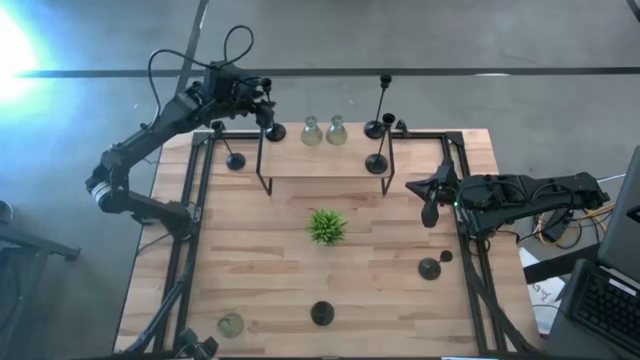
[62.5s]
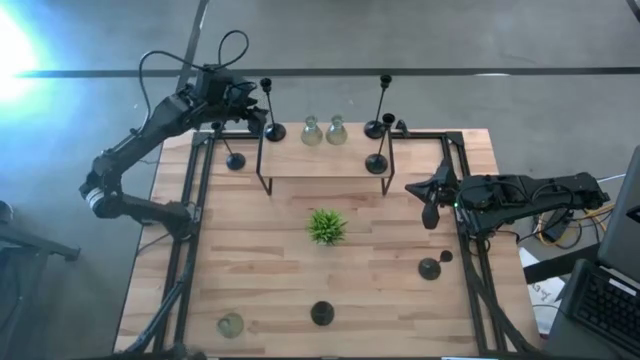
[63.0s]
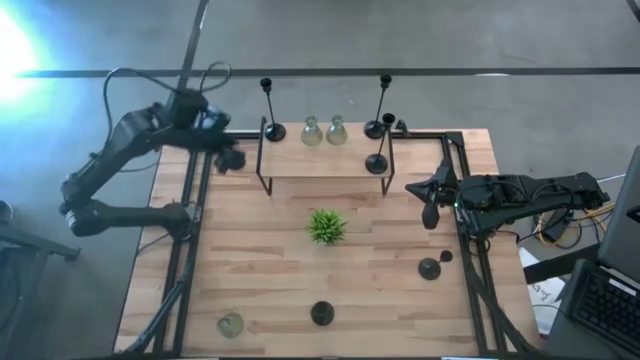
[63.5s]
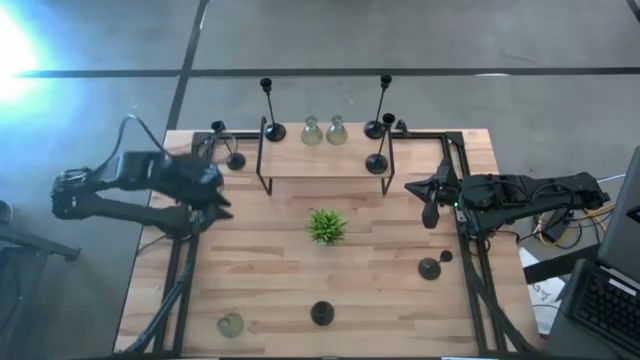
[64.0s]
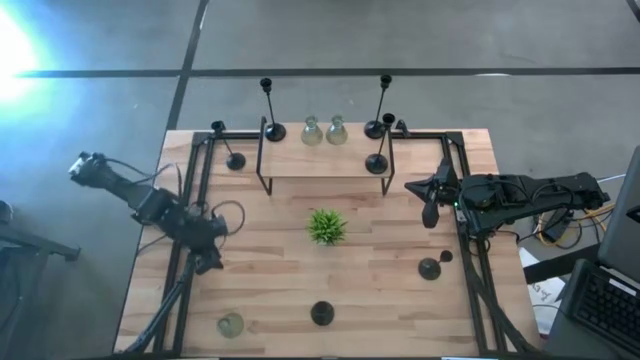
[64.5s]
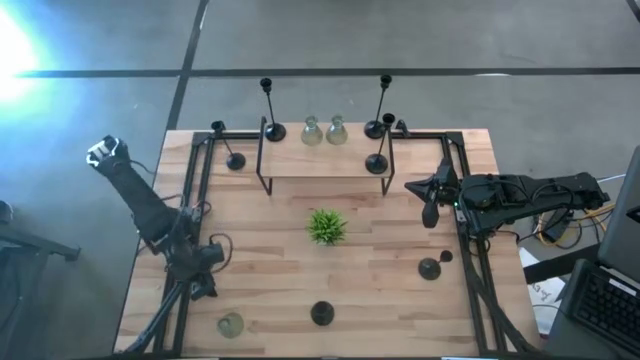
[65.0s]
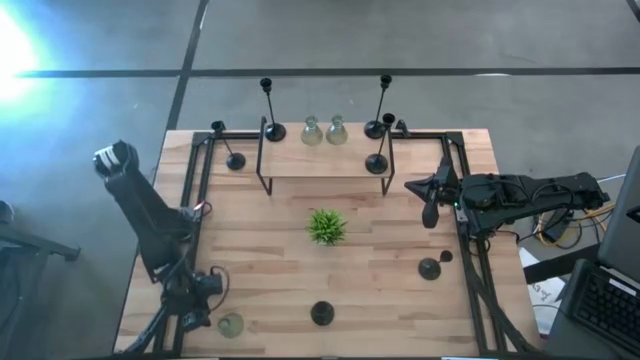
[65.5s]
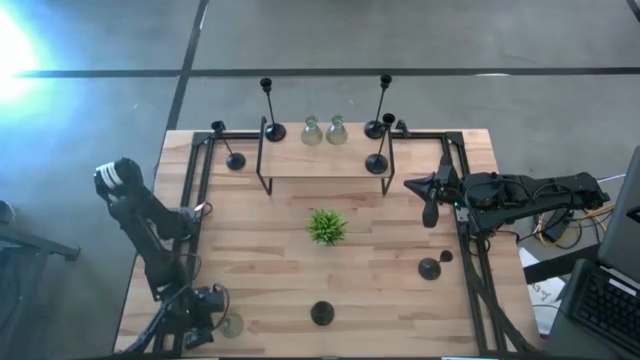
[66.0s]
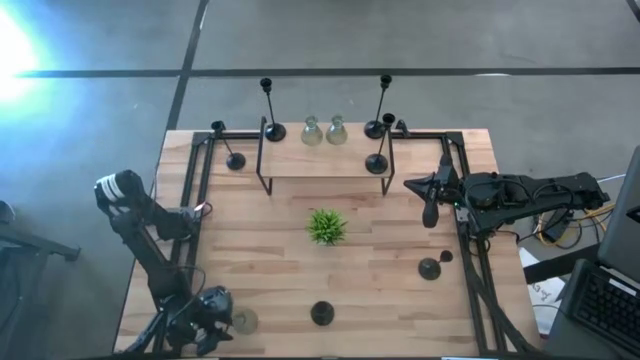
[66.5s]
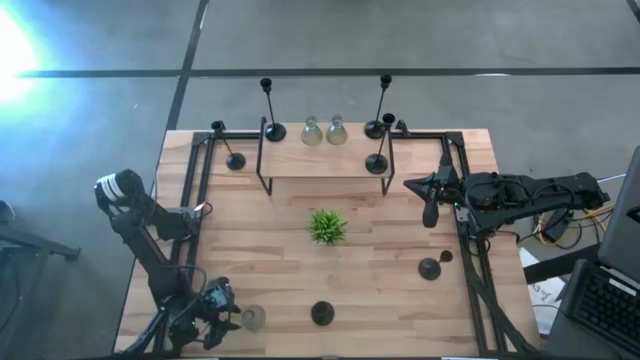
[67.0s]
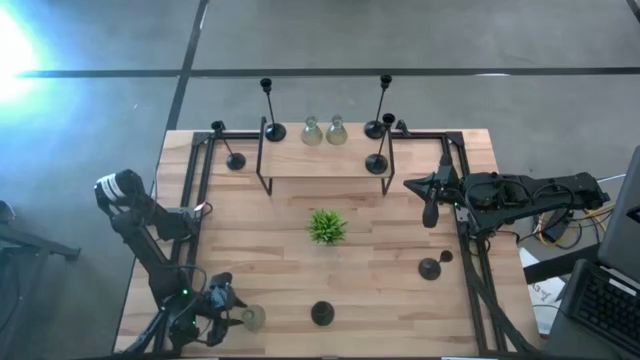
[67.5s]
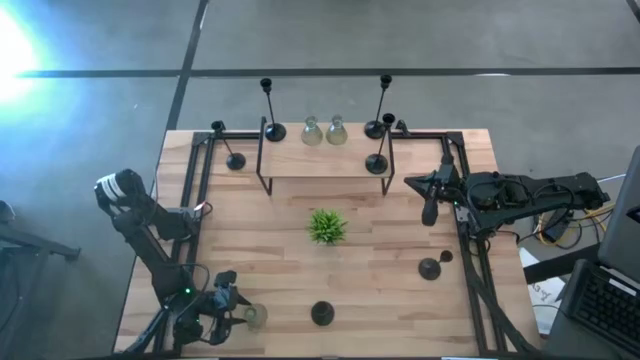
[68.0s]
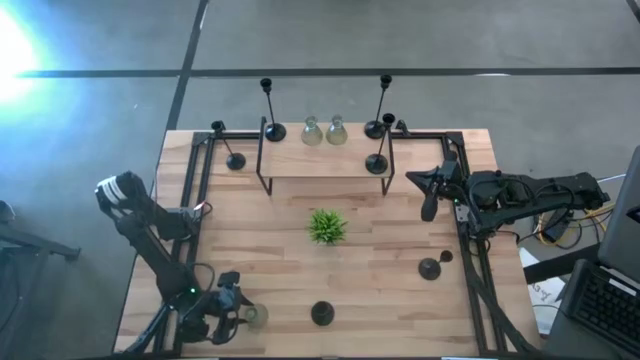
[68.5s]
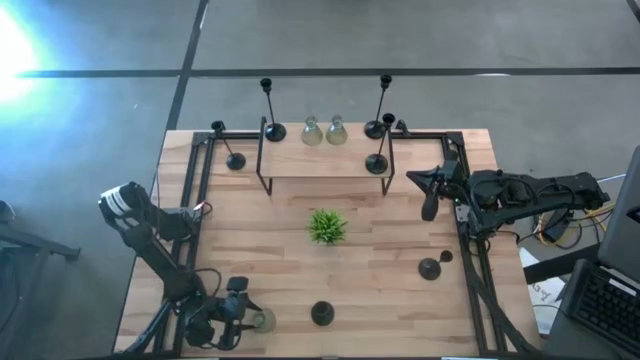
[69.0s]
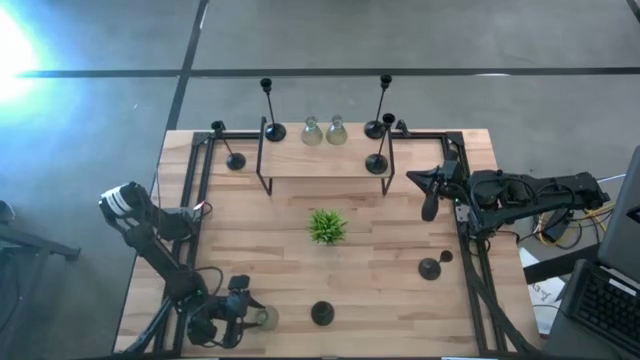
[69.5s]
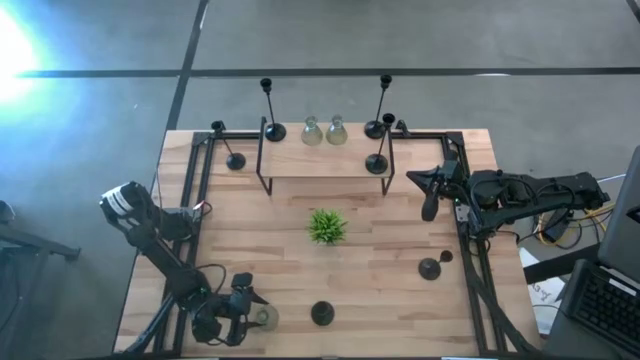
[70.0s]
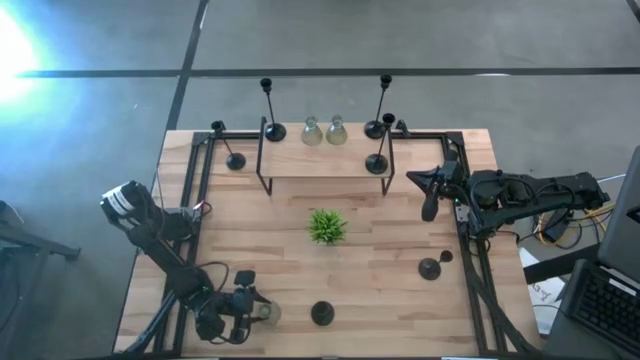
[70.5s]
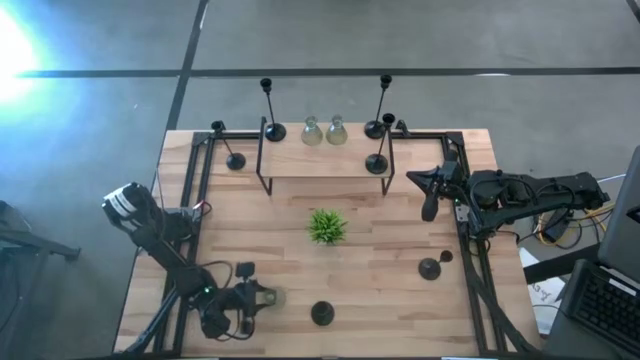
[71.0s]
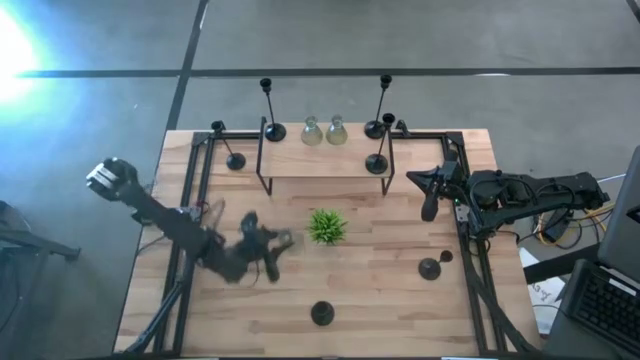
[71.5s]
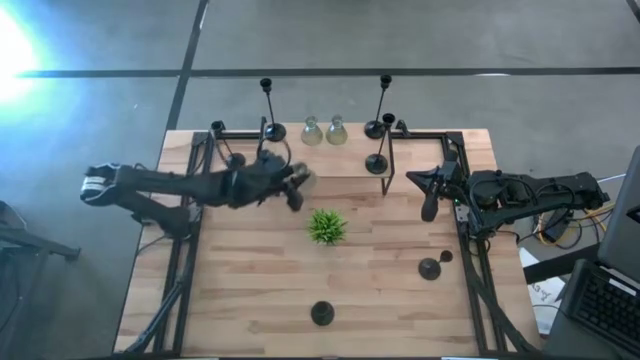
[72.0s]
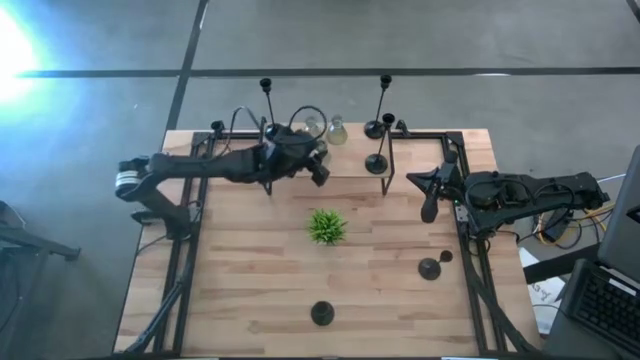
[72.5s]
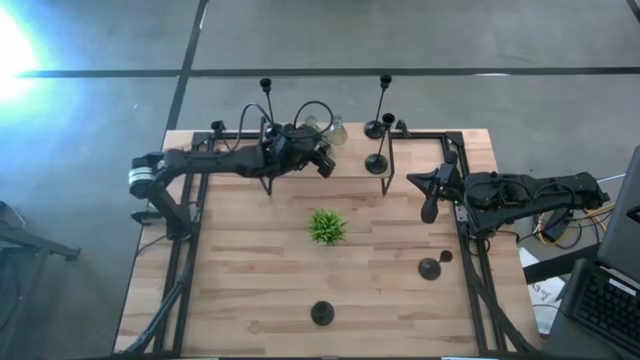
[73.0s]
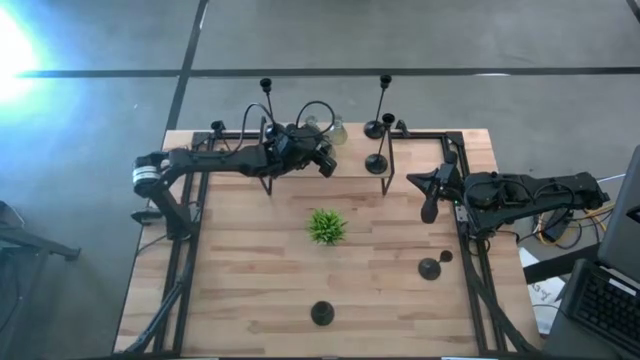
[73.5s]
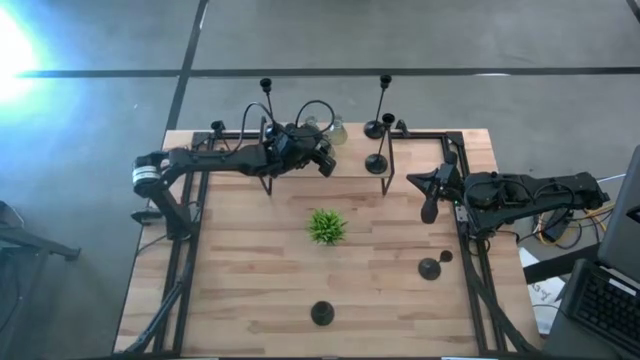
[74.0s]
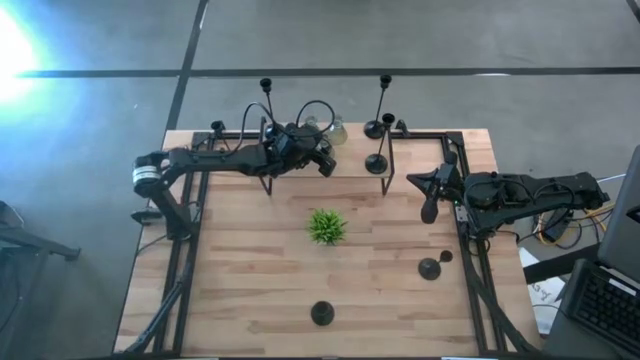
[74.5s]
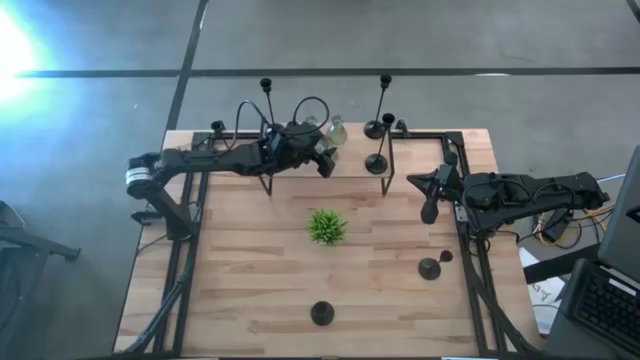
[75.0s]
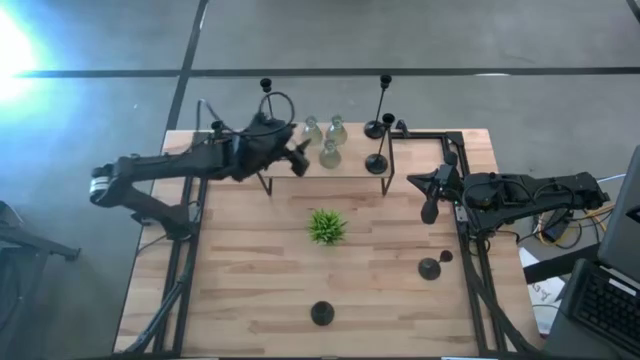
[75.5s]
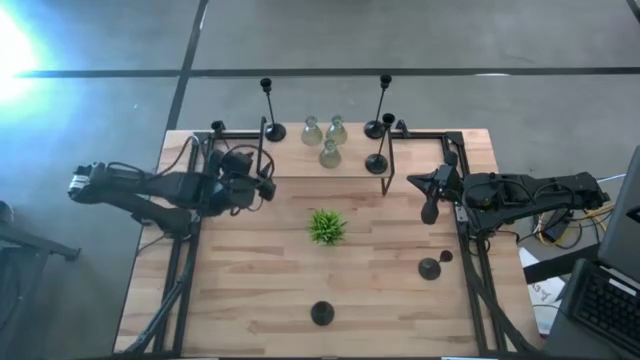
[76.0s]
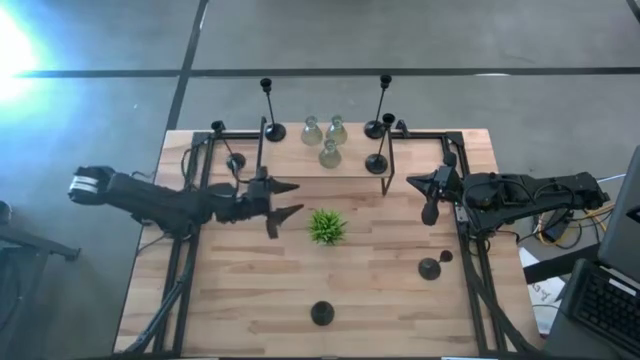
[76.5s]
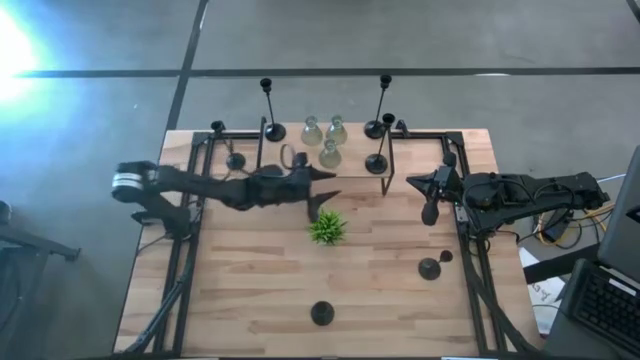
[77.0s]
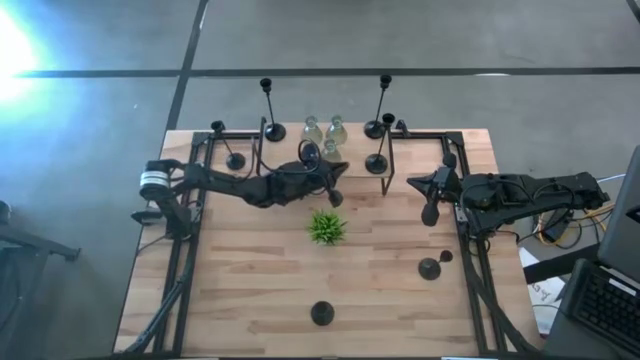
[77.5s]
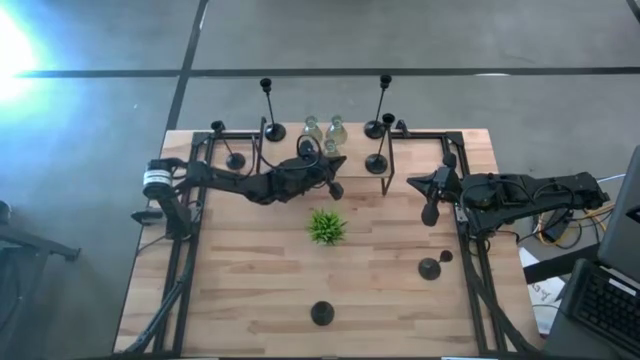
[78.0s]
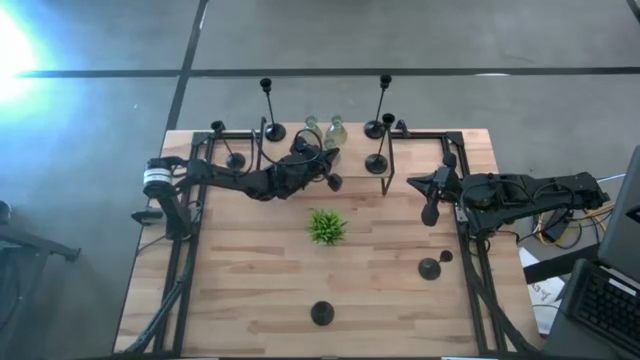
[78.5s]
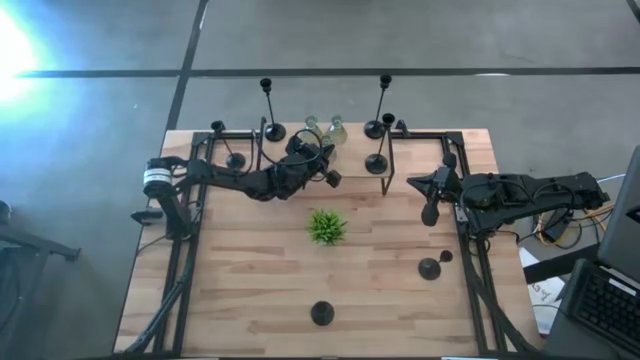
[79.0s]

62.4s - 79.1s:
Task: Pick & Place candle stick holders
Put the transparent glass candle holder on the shelf
